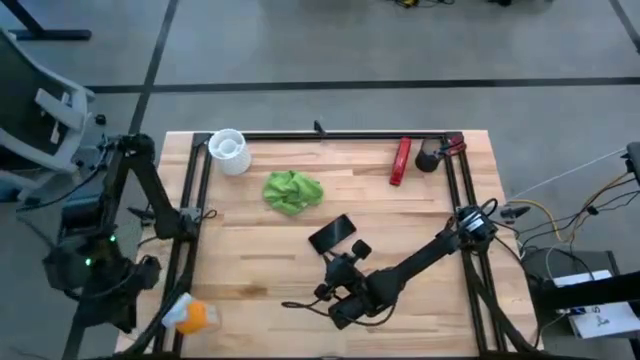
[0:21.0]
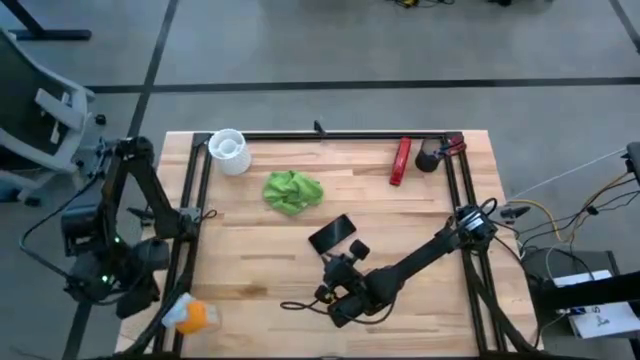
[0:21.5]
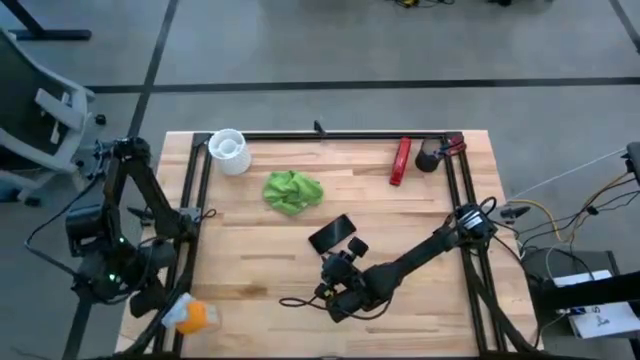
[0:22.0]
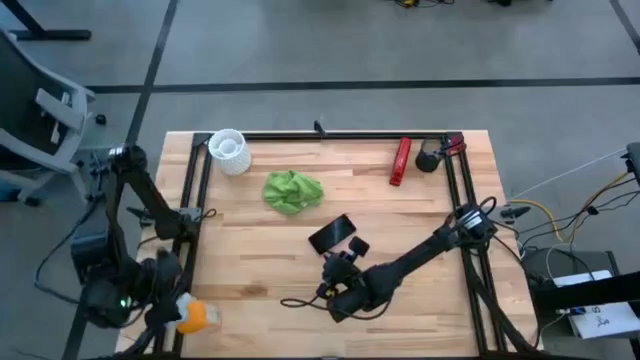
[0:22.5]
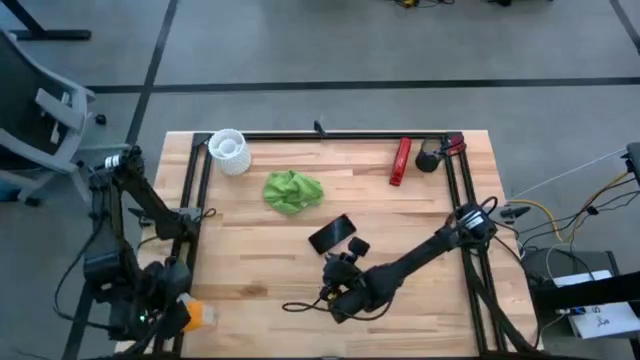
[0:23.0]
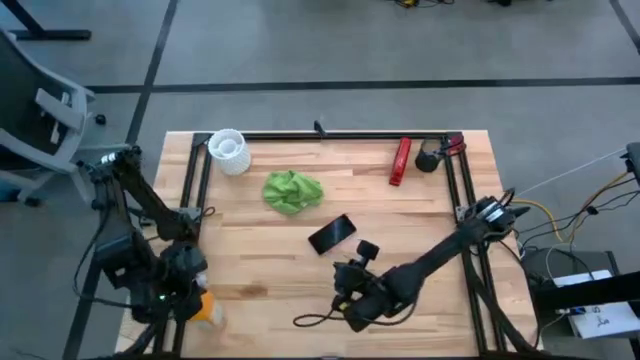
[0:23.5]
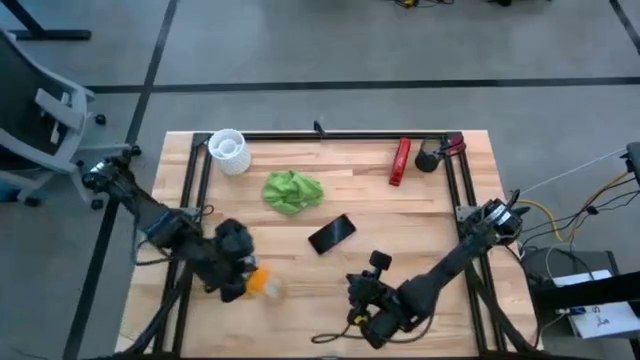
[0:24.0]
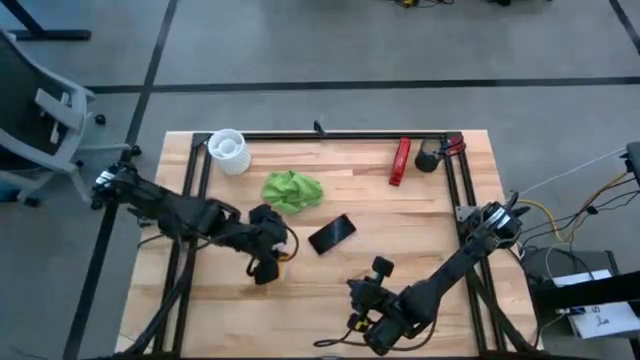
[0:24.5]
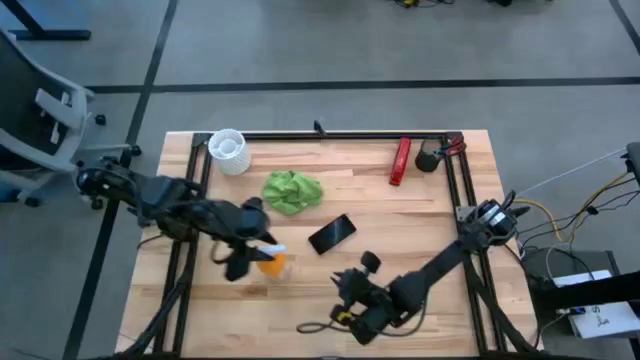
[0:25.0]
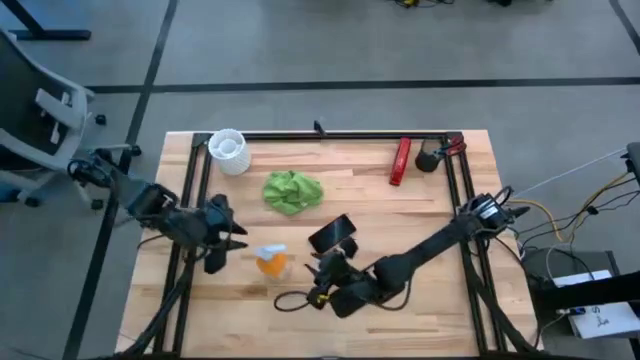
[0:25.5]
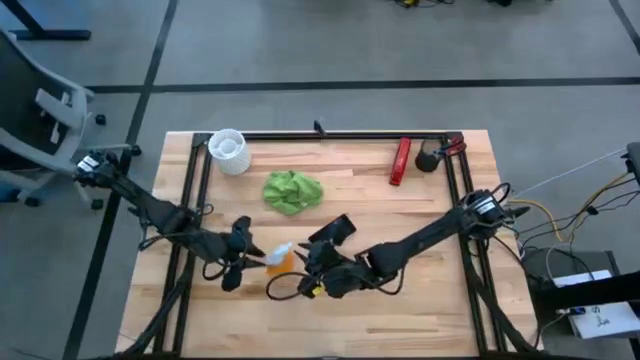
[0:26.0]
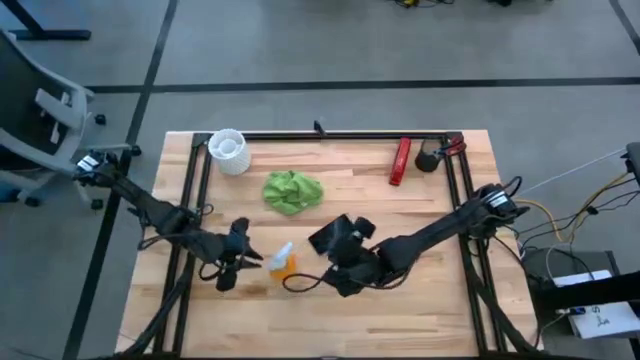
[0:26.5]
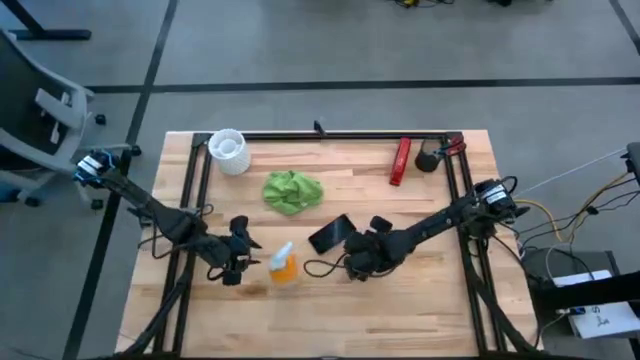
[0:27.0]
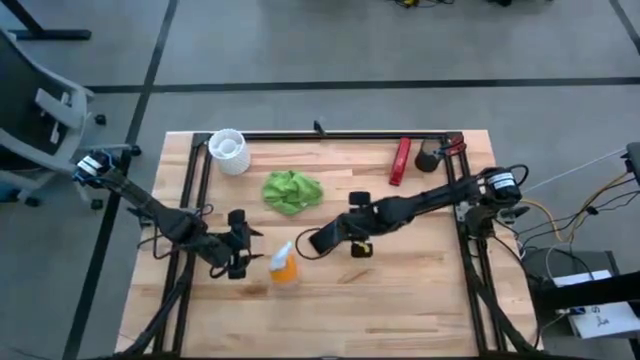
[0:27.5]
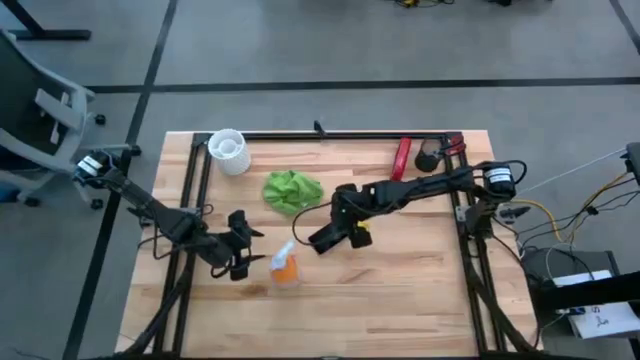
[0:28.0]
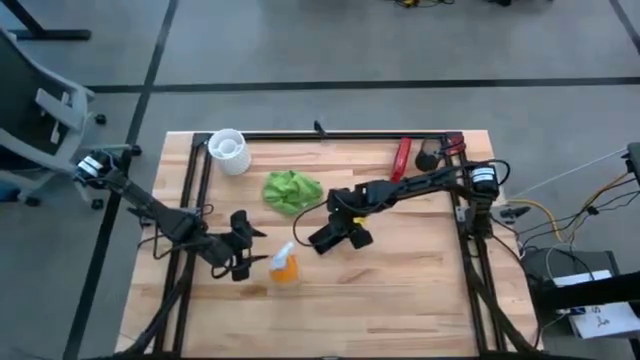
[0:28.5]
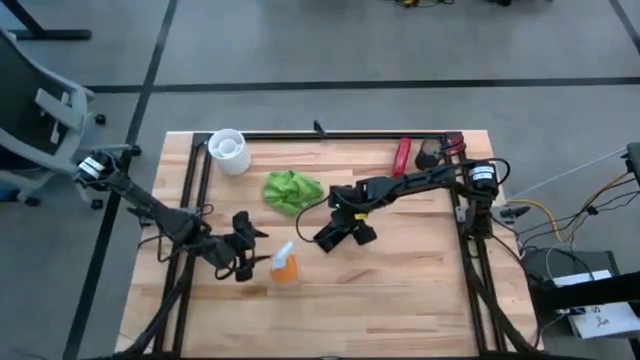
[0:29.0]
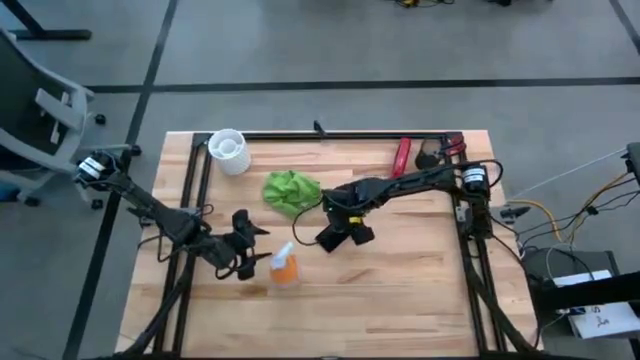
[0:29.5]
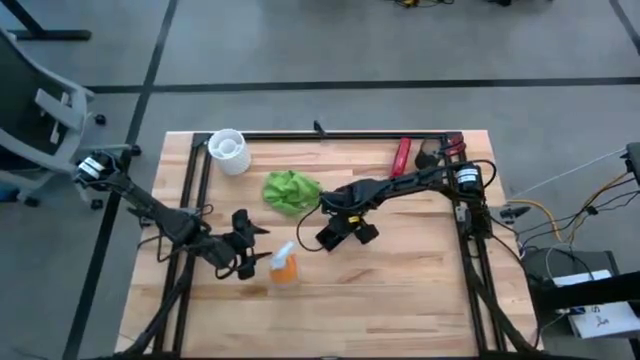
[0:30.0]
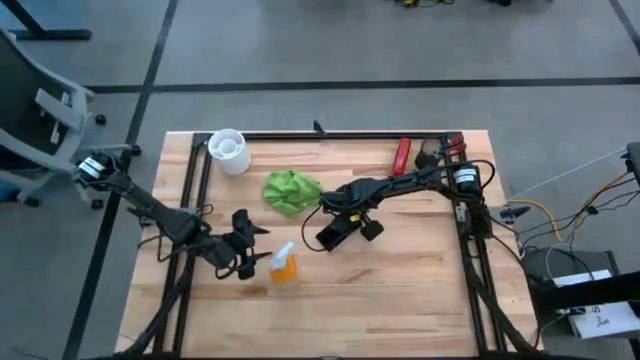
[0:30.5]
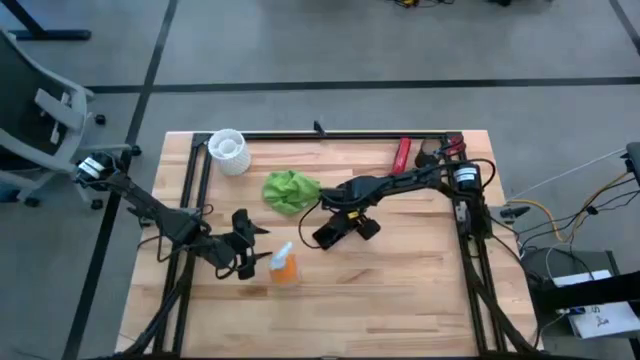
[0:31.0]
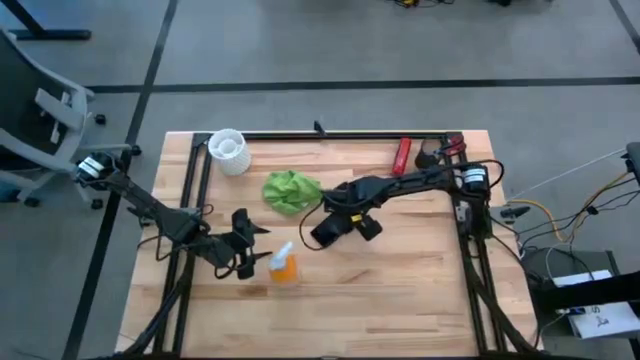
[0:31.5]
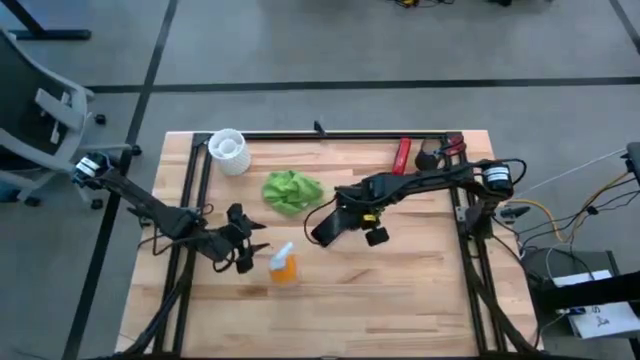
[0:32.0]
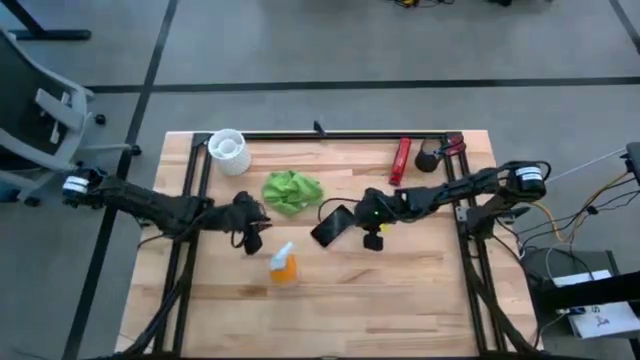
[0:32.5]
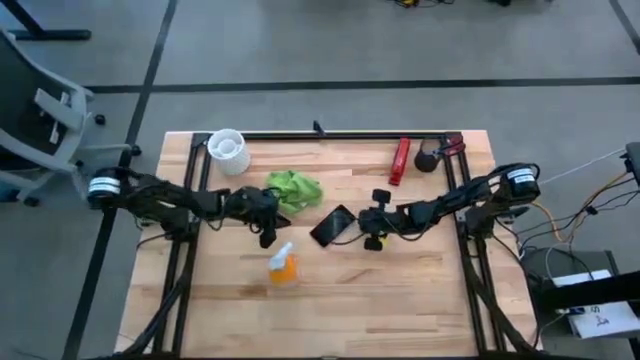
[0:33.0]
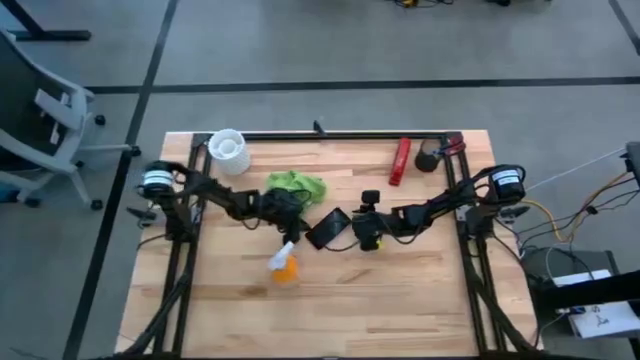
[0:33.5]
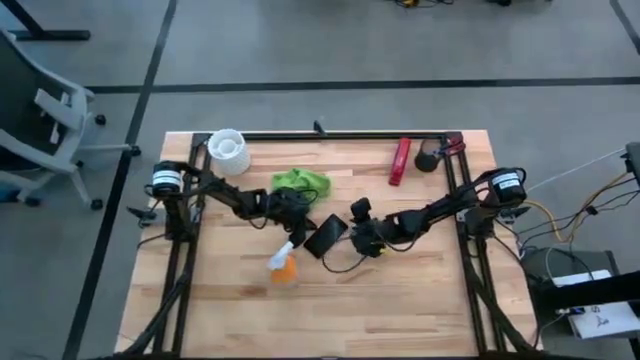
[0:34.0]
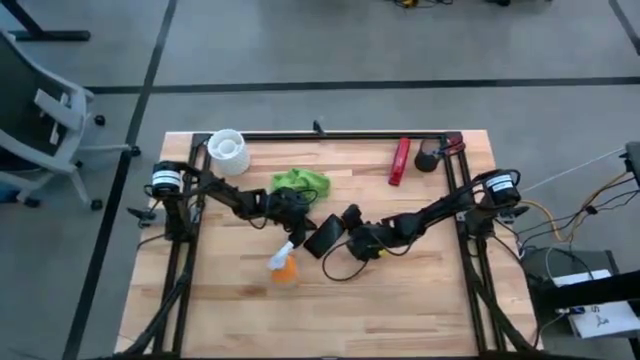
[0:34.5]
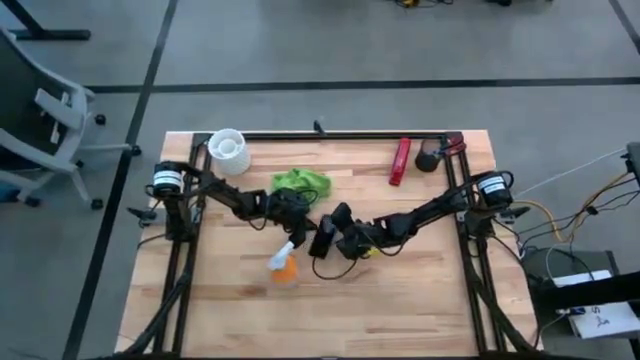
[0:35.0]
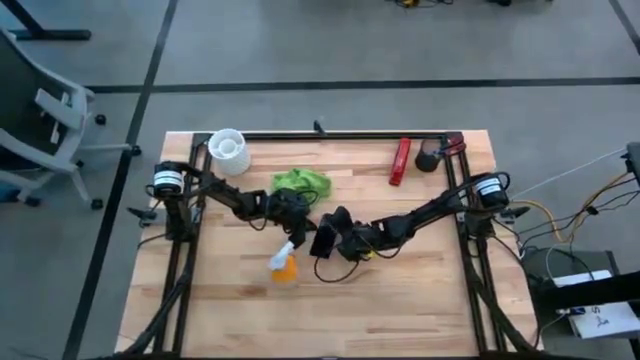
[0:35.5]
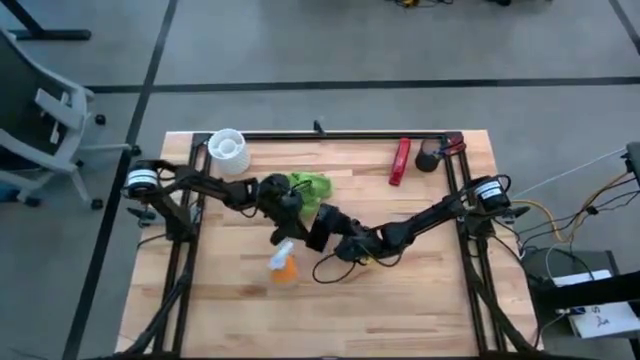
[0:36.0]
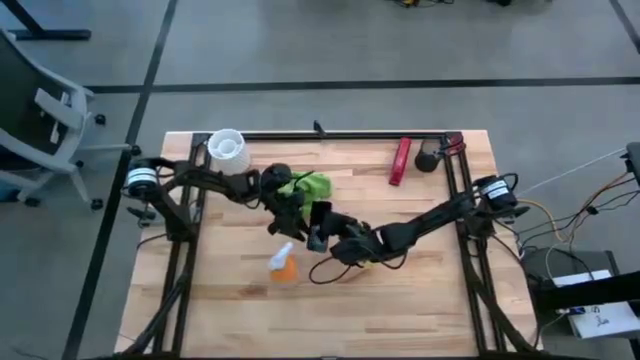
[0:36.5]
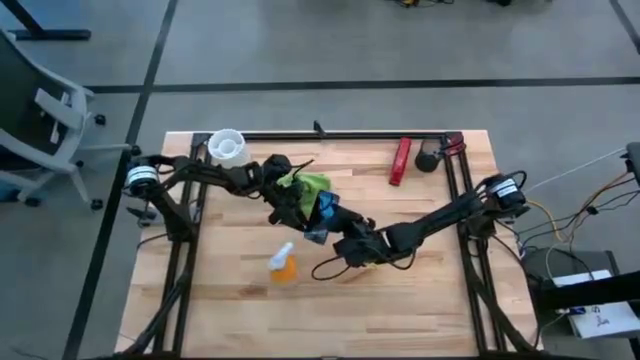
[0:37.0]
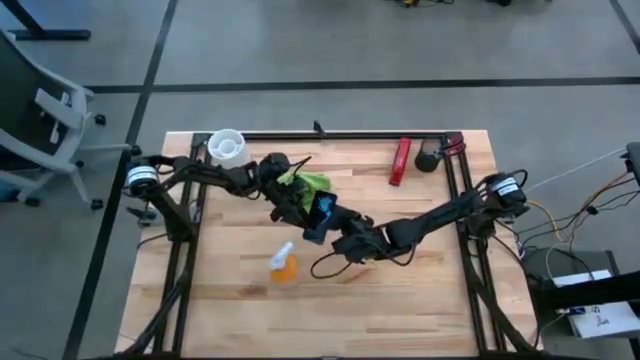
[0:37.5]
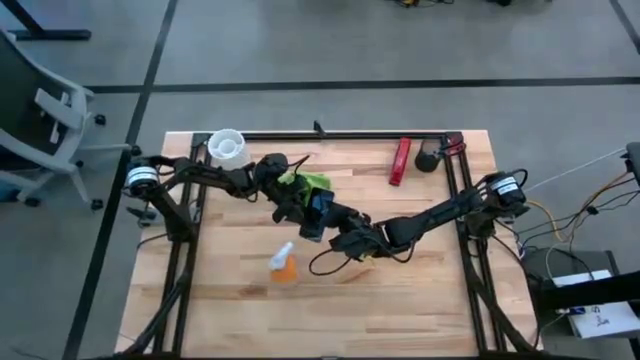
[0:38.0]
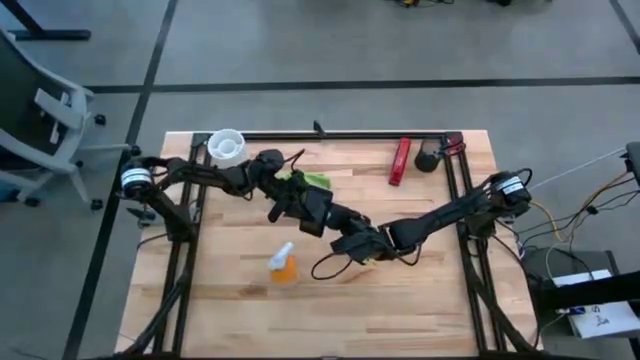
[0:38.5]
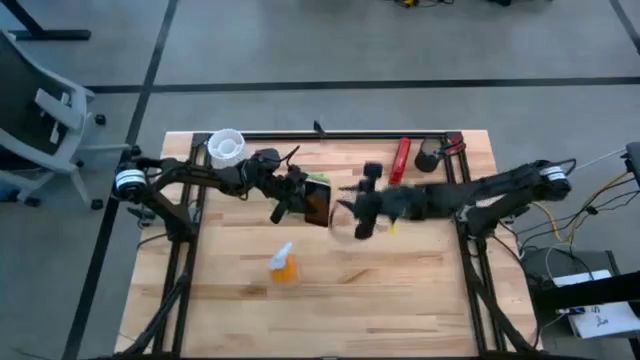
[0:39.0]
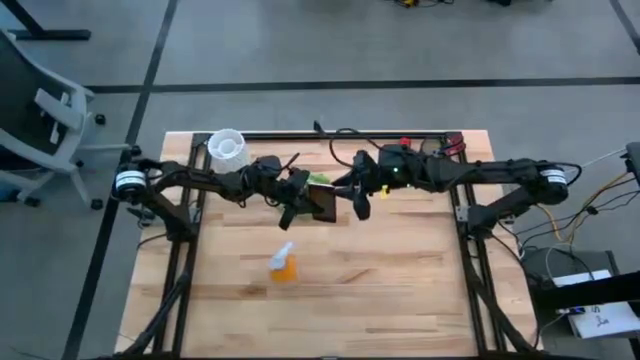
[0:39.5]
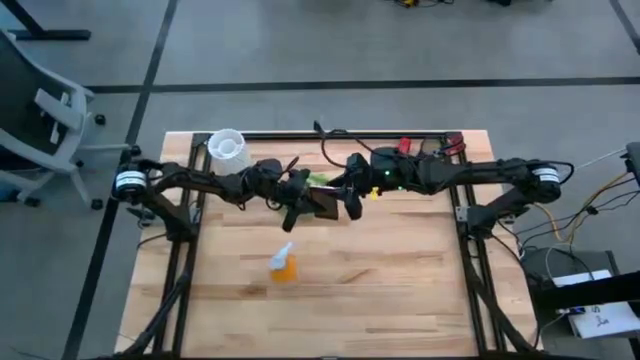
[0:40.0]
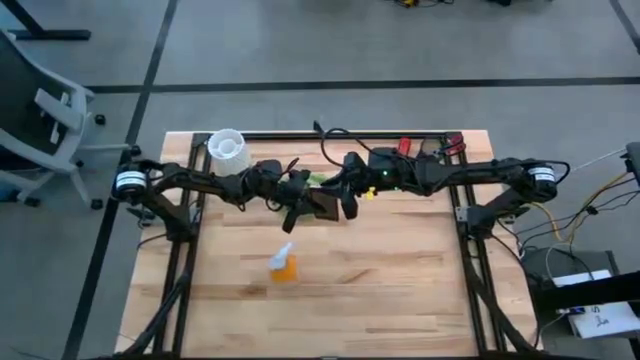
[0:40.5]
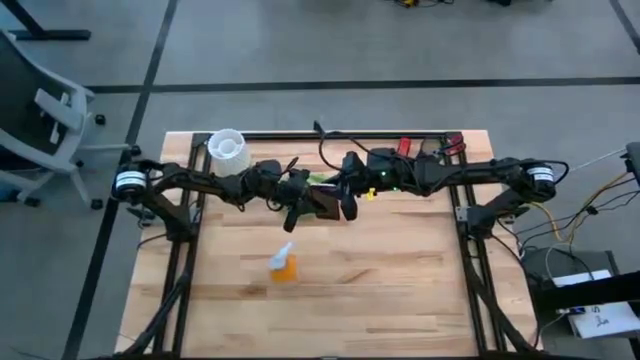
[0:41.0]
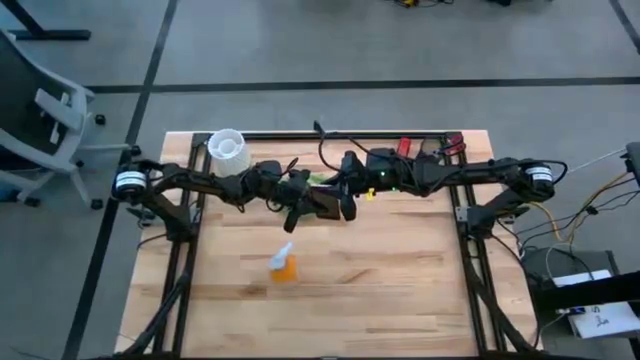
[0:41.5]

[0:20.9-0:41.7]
Task: Apply microfiber cloth
Spray the front and back of the cellphone using the cleaning bottle
